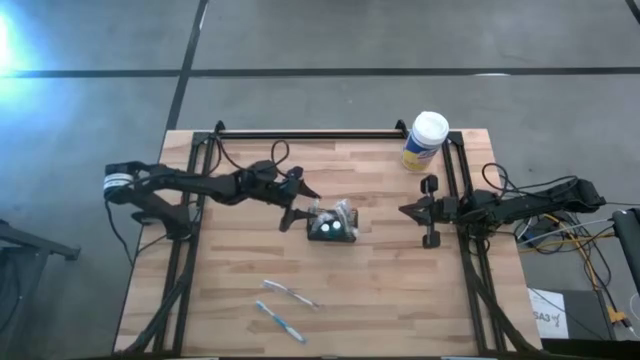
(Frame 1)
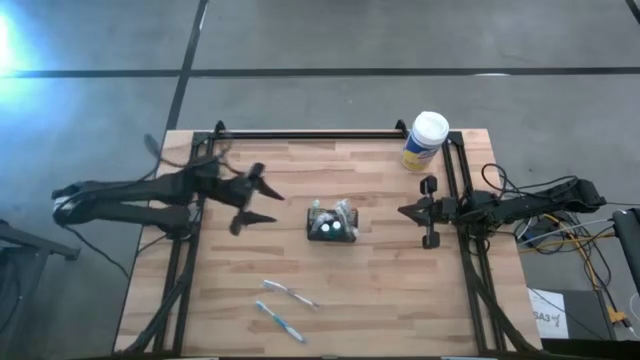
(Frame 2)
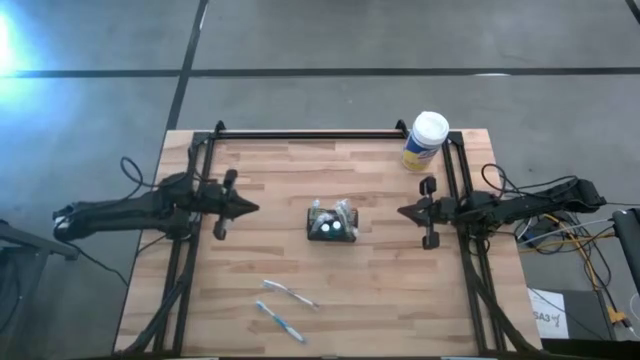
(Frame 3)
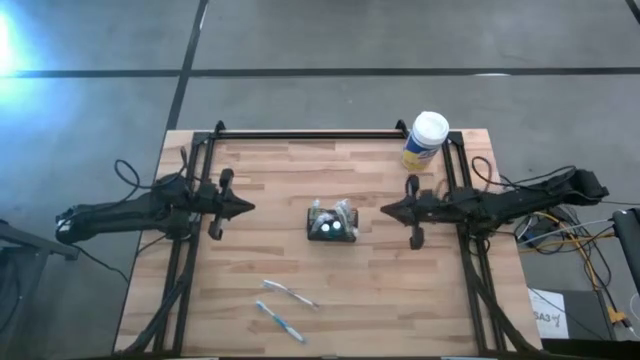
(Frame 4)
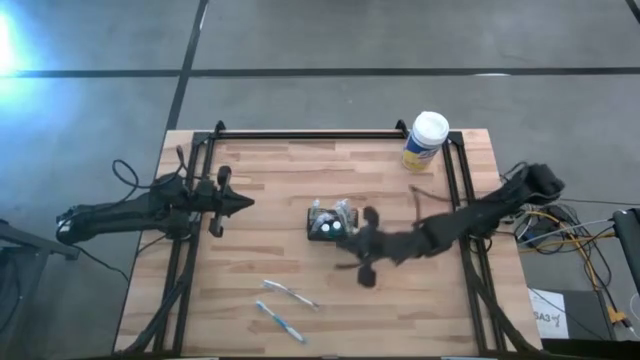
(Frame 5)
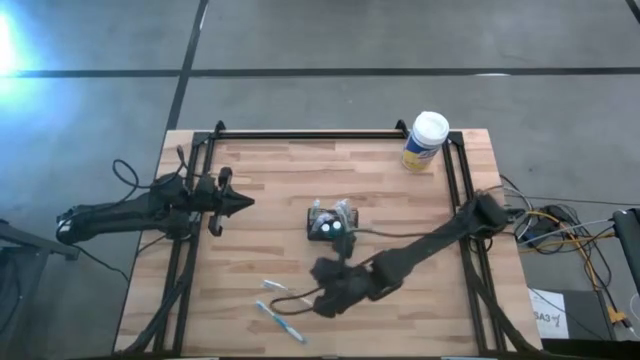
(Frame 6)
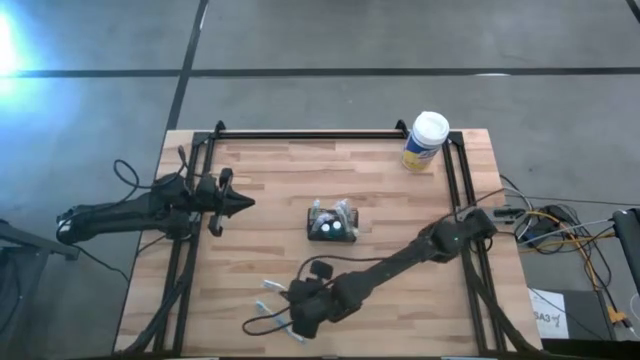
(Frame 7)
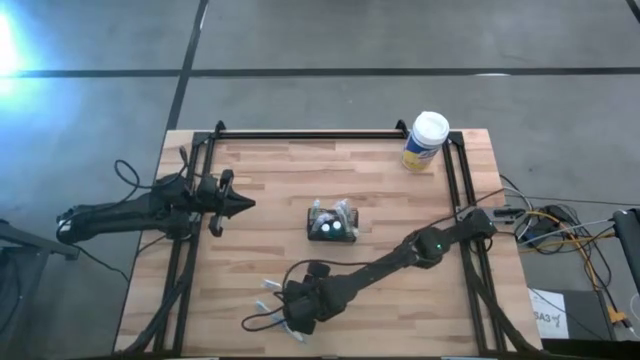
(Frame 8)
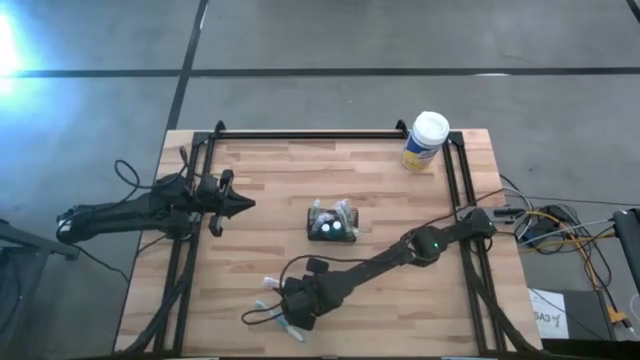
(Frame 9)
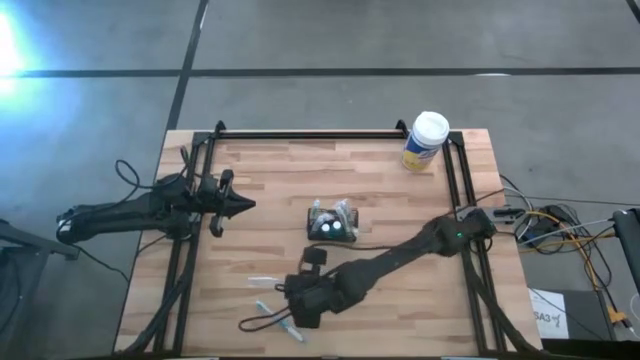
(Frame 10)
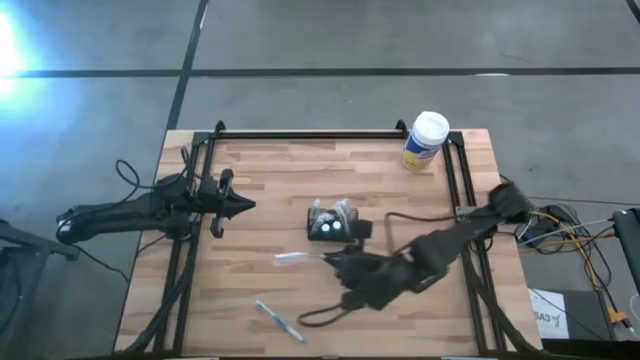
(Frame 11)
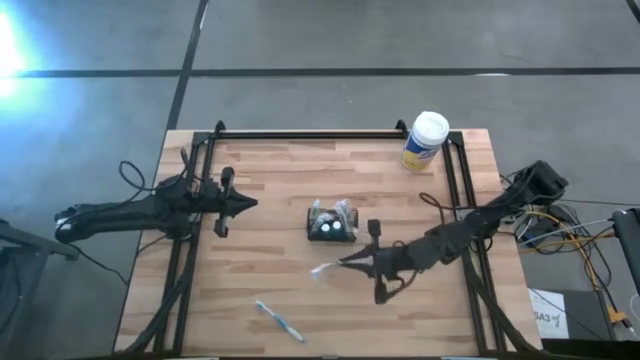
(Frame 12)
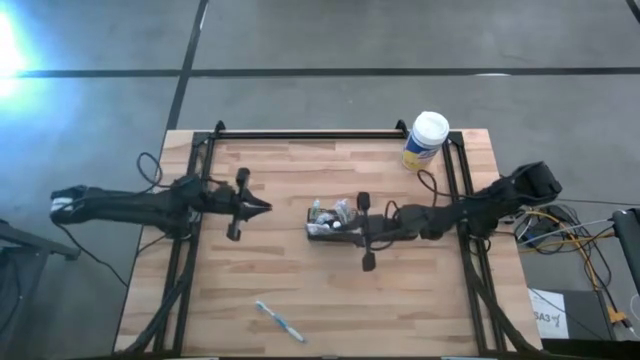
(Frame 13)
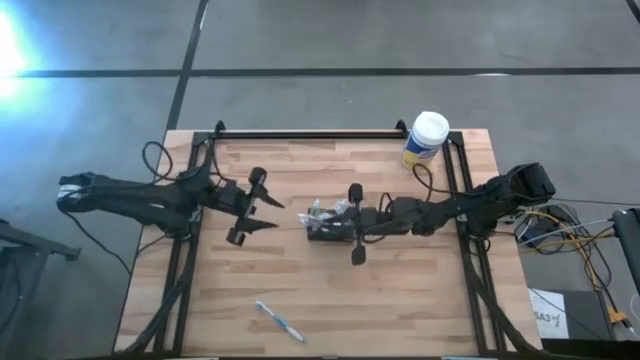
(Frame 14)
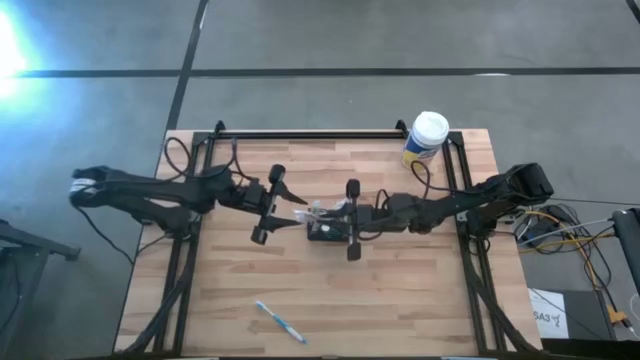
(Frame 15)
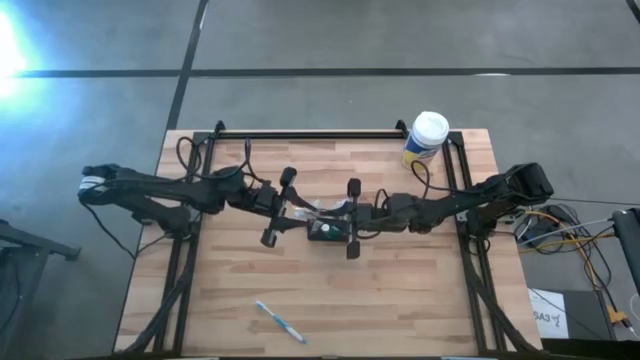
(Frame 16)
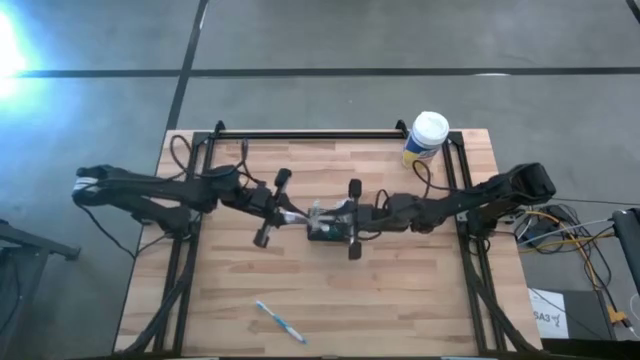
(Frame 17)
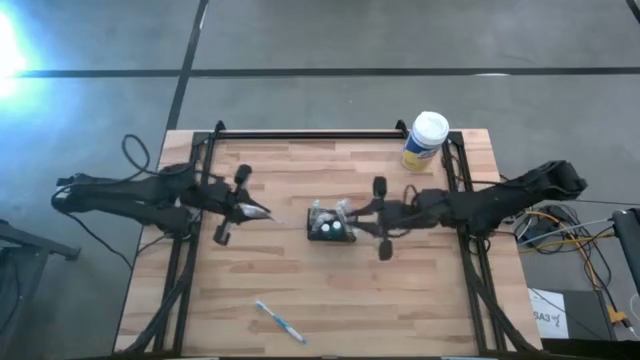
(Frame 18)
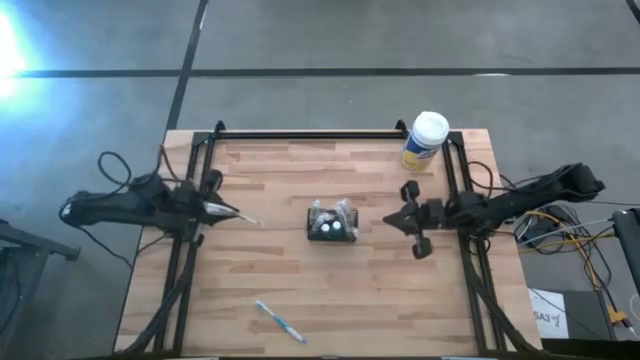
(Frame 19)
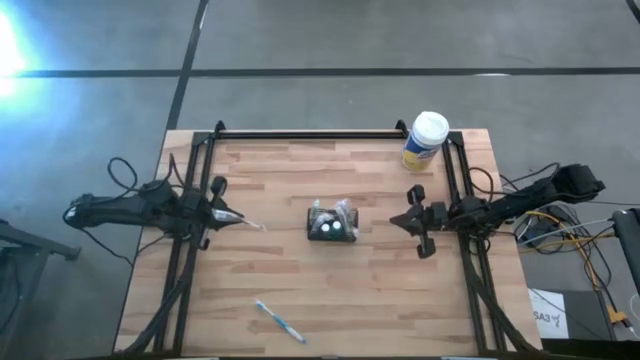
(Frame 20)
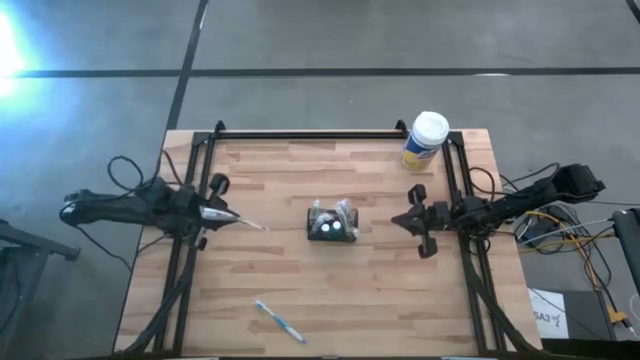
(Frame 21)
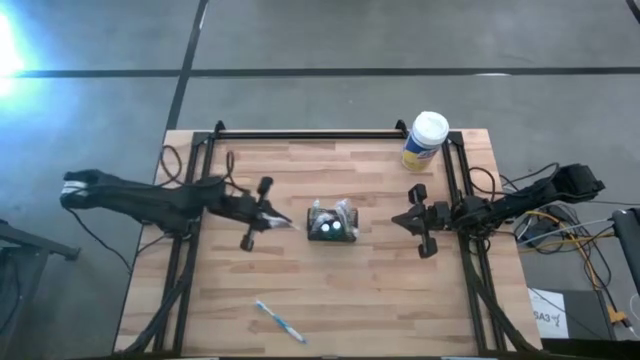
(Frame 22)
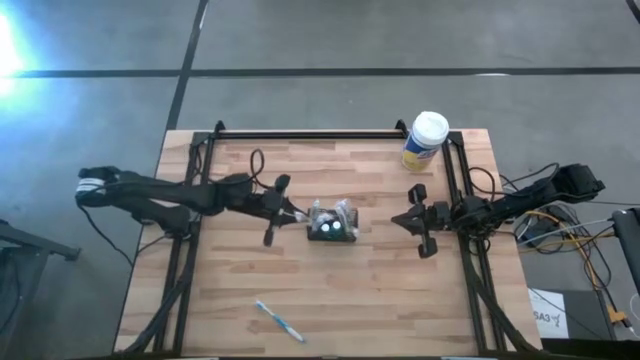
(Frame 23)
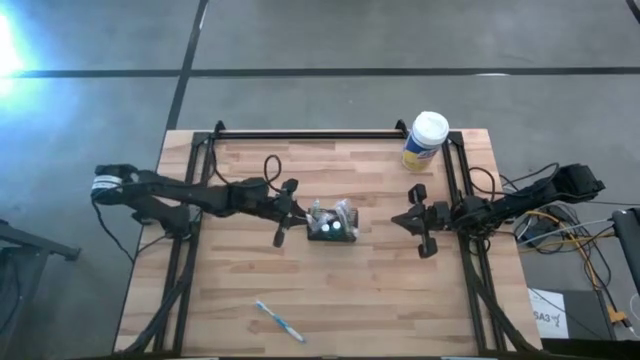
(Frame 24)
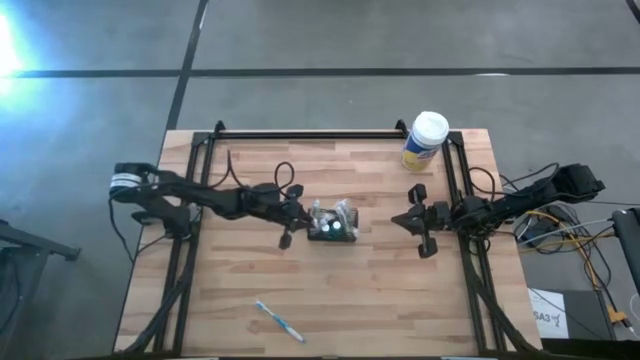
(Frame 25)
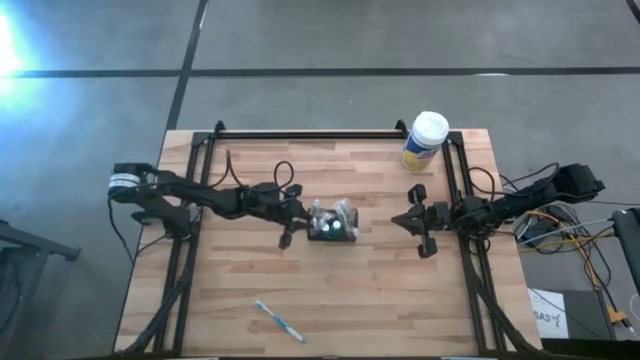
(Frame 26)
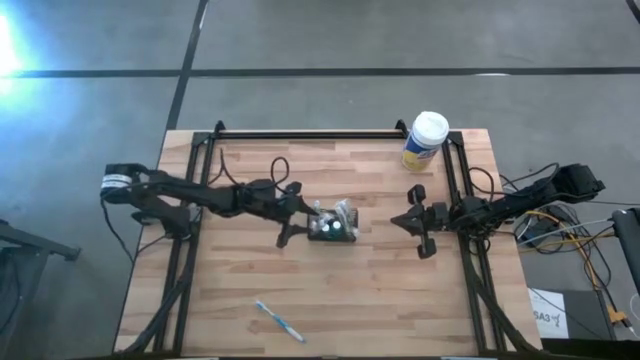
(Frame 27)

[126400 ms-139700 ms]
Task: Pick & Place toothbrushing station
Put the violet toothbrush into the black wire organizer

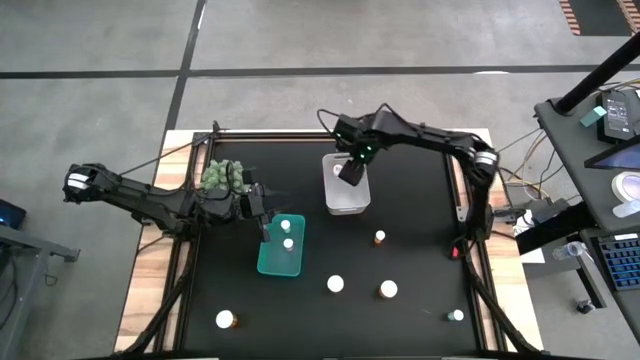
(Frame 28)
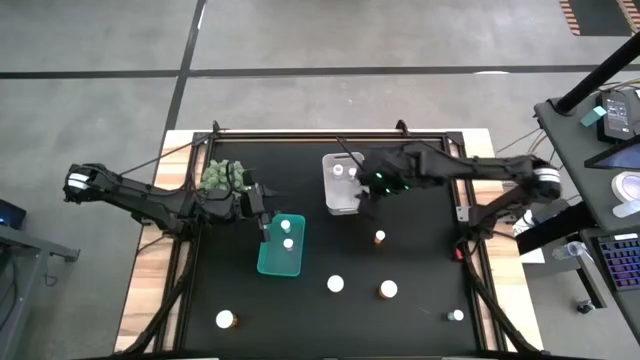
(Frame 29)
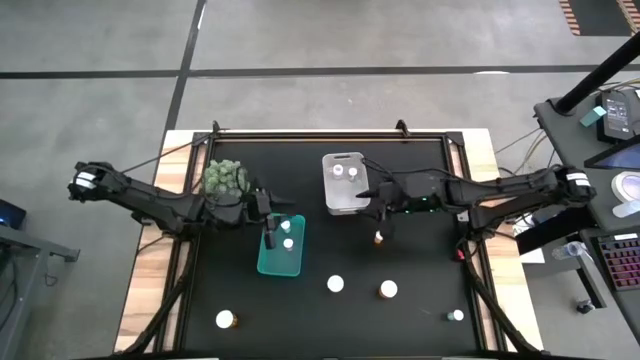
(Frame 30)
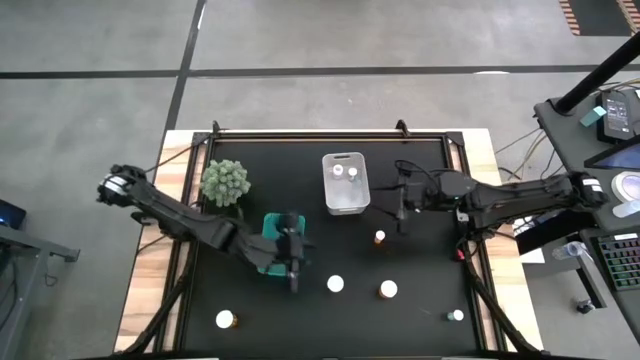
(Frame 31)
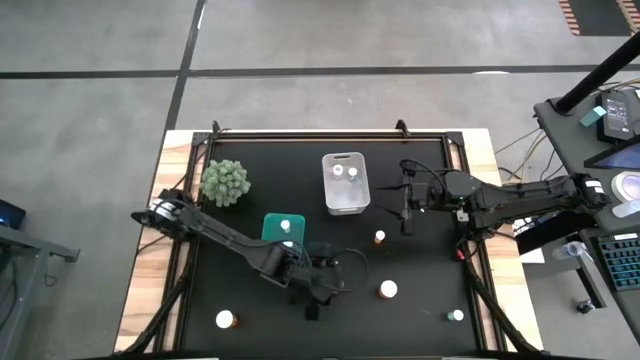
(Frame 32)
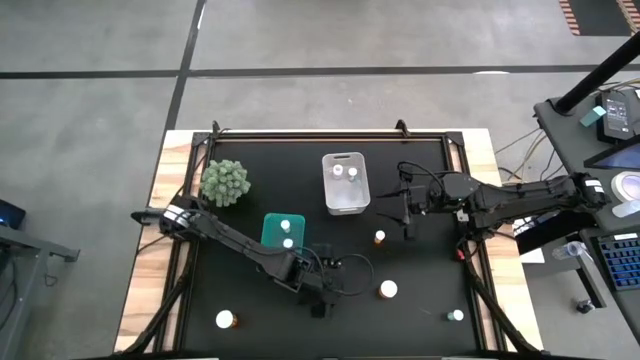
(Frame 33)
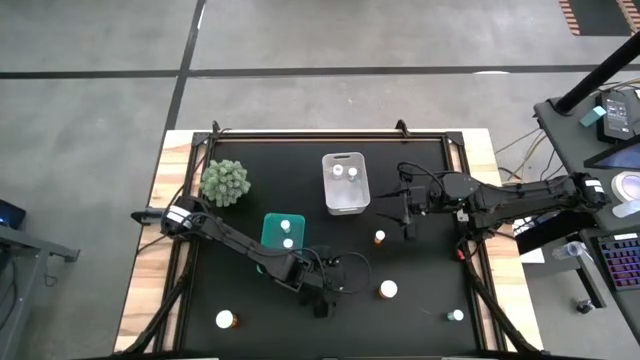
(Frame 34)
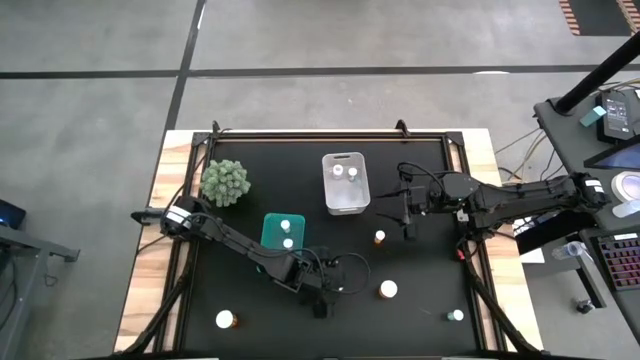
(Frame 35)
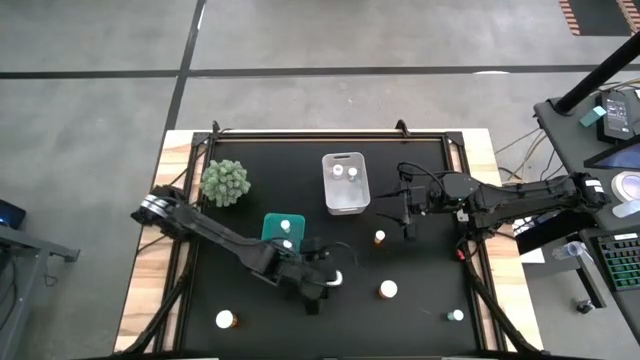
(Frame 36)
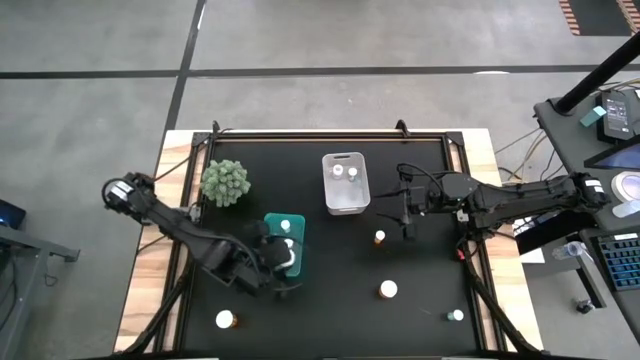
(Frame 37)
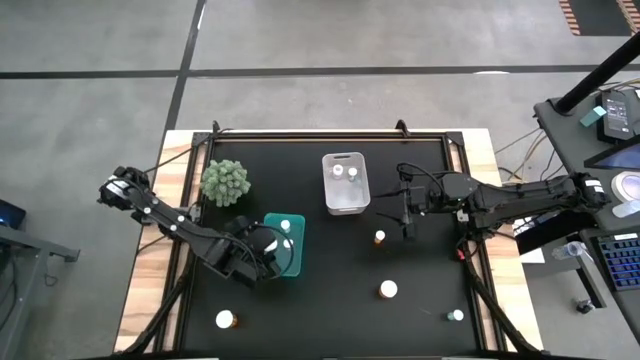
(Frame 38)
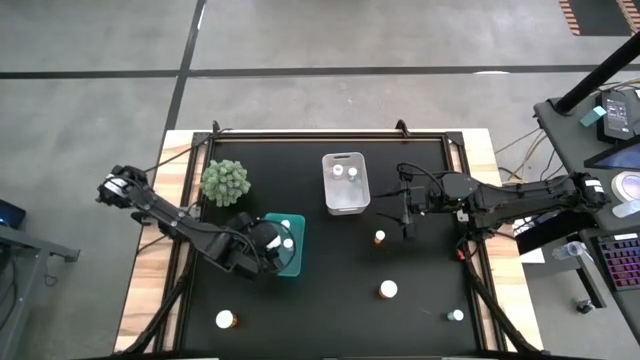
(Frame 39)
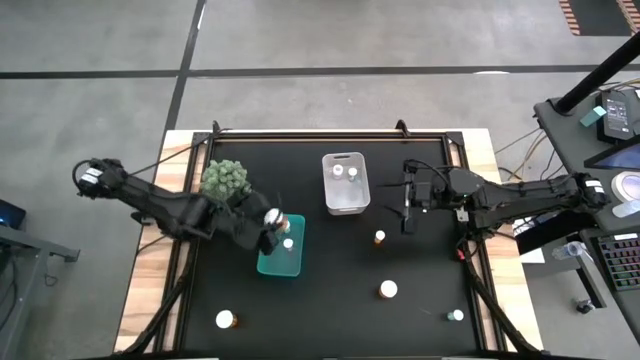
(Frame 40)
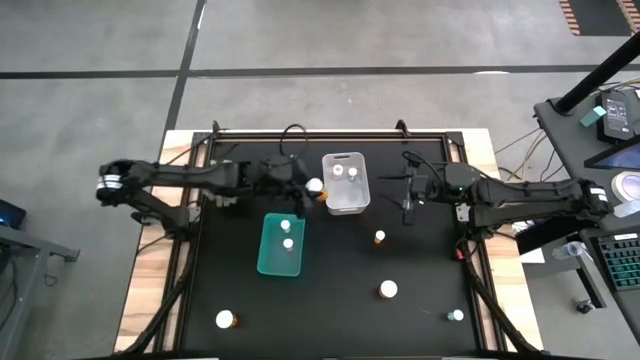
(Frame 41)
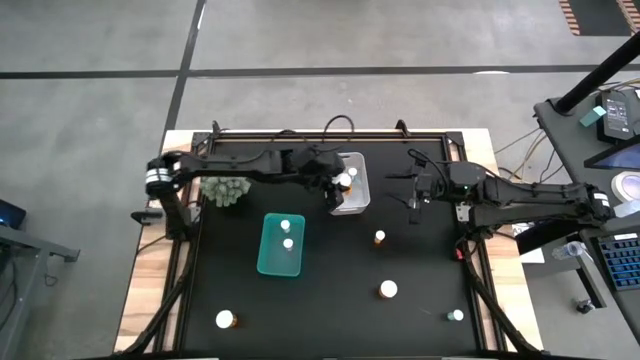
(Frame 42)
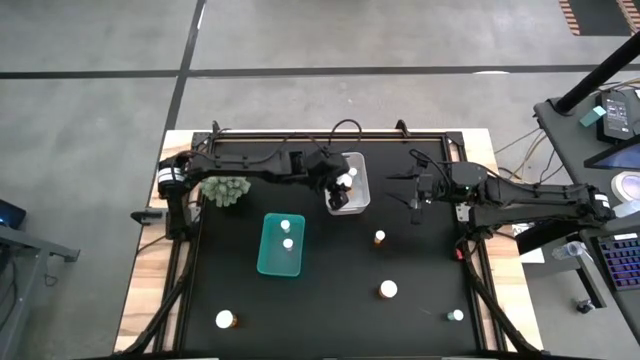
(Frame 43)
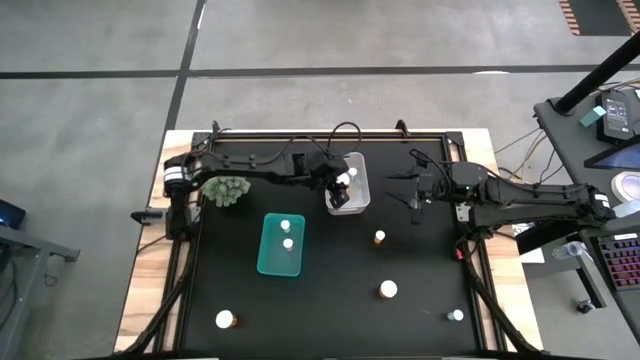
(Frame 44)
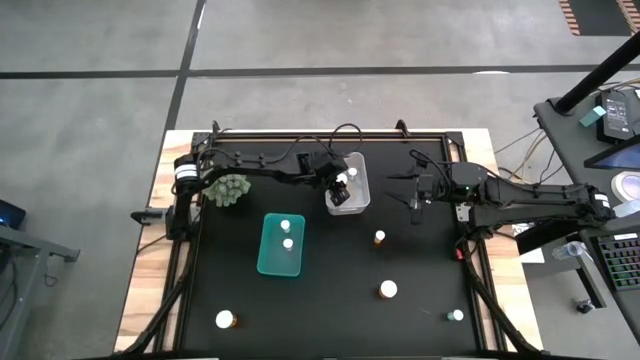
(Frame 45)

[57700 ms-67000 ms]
Task: Pick and place medicine bottles into bin by pill shape (circle, oval)
Put the middle orange pill bottle into the white bin
